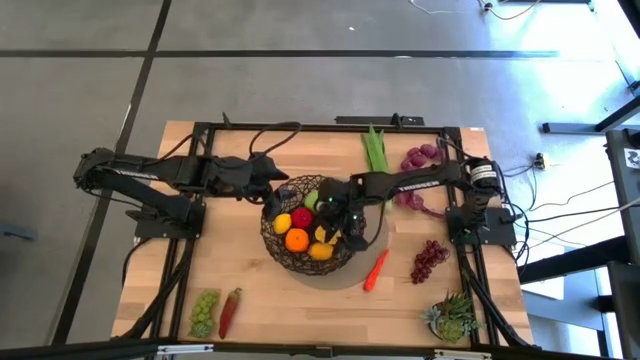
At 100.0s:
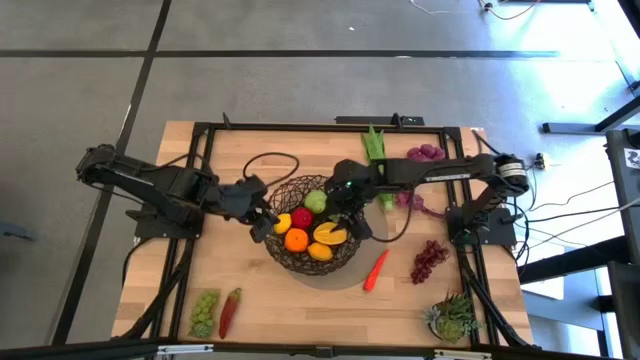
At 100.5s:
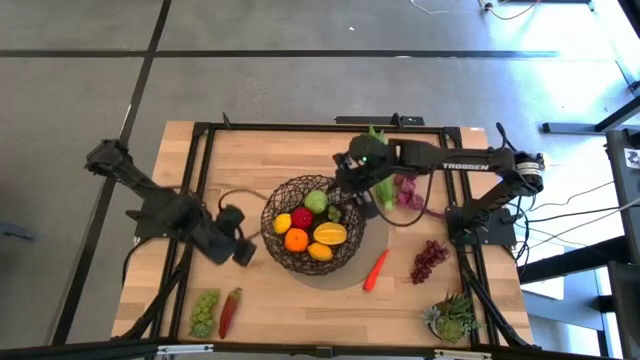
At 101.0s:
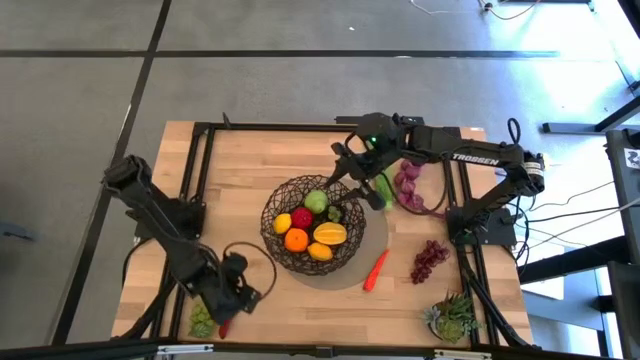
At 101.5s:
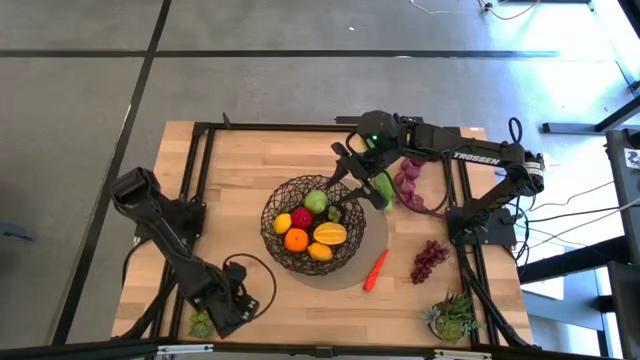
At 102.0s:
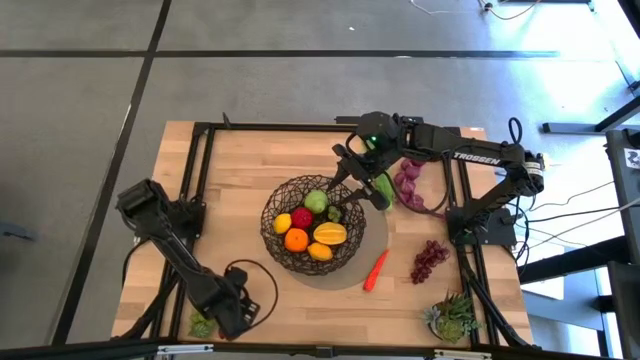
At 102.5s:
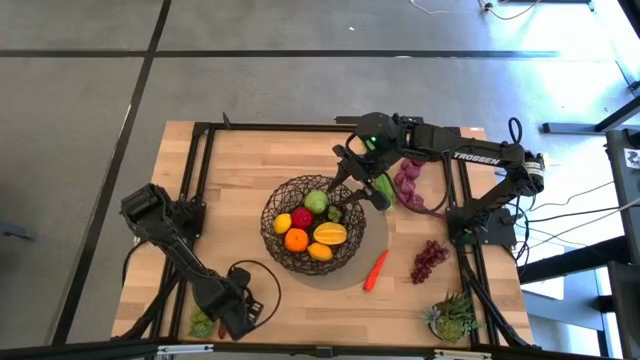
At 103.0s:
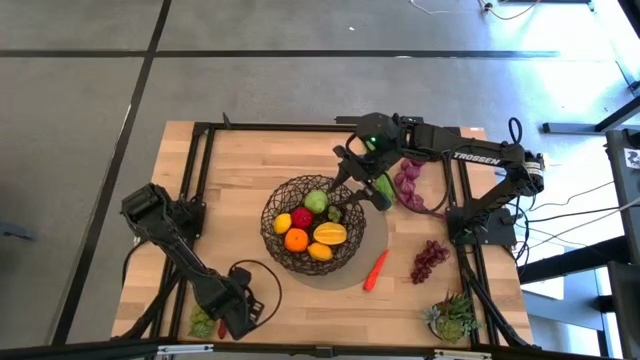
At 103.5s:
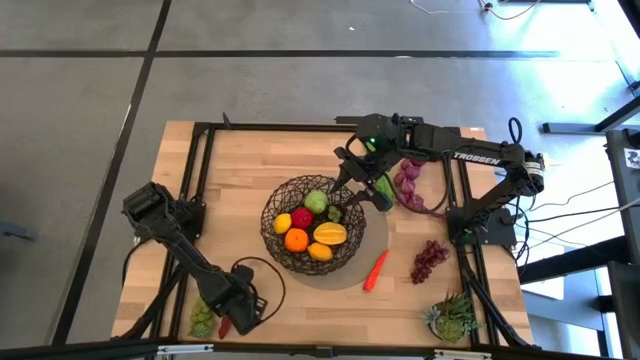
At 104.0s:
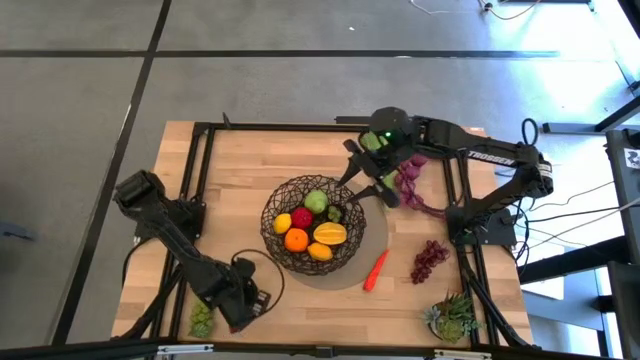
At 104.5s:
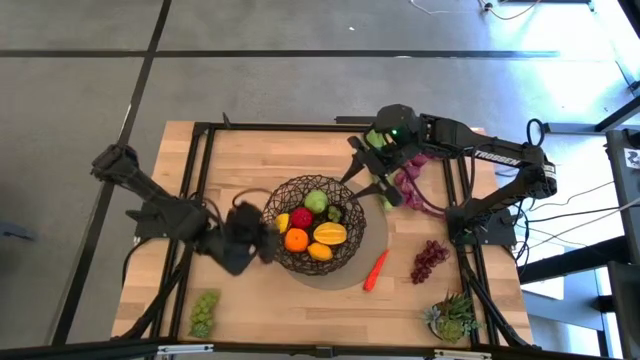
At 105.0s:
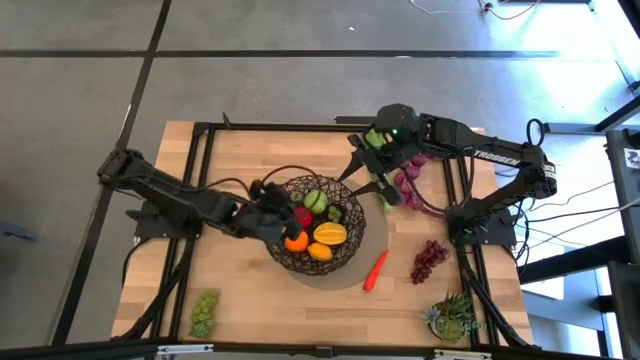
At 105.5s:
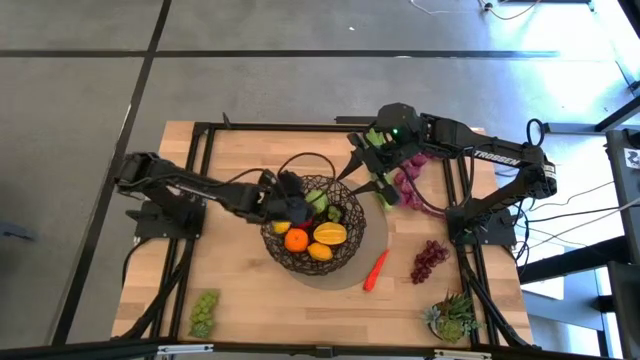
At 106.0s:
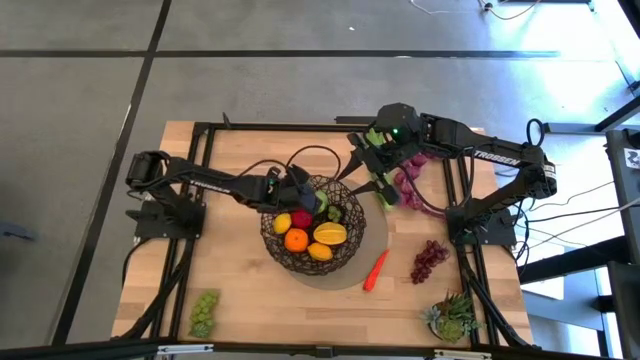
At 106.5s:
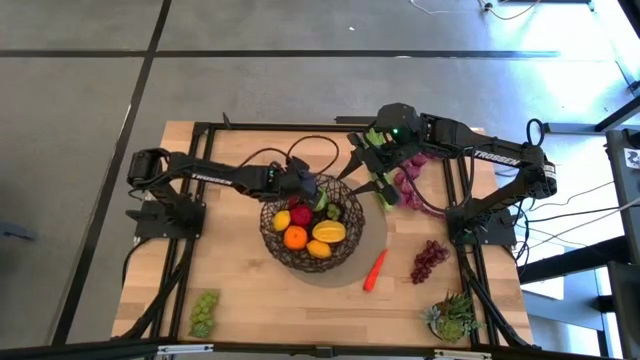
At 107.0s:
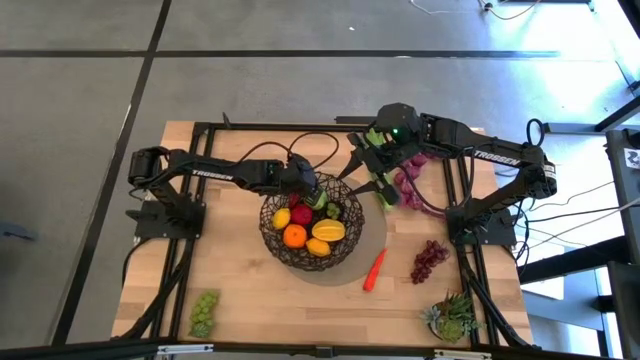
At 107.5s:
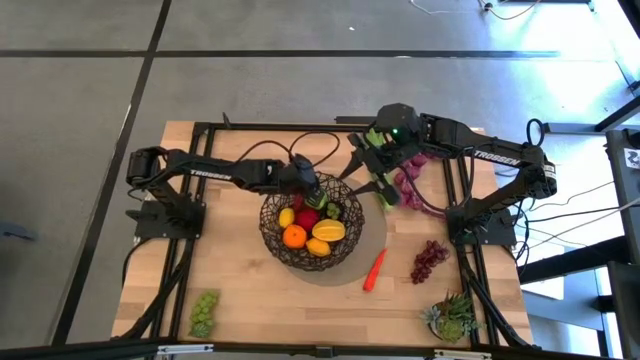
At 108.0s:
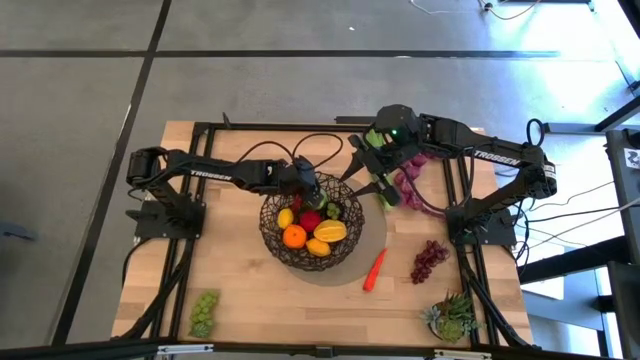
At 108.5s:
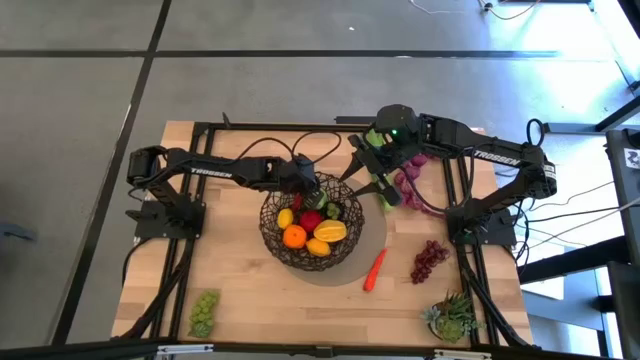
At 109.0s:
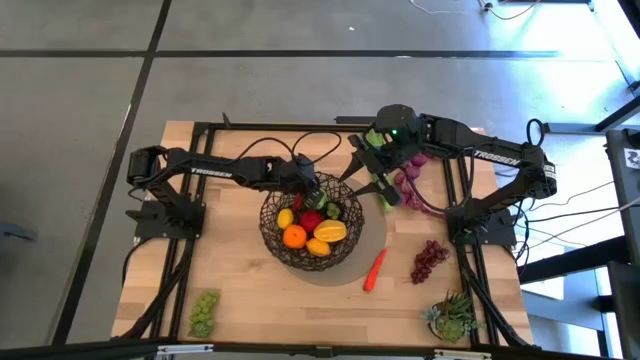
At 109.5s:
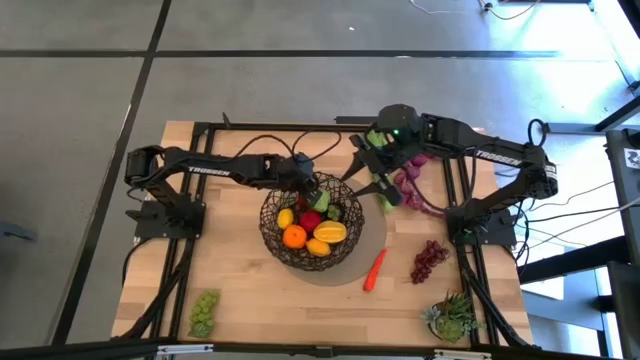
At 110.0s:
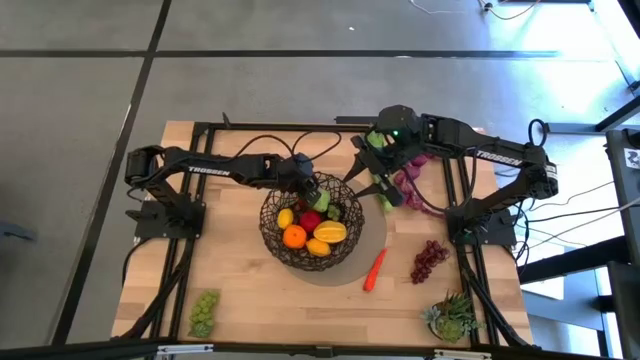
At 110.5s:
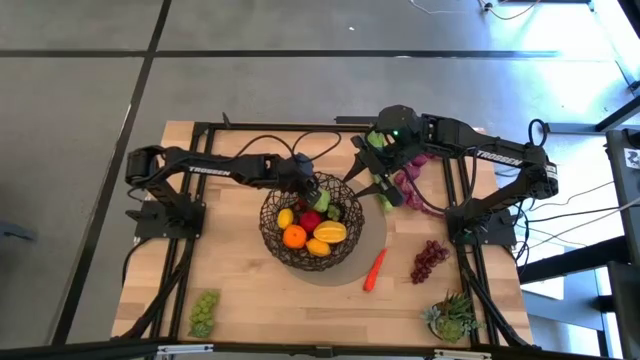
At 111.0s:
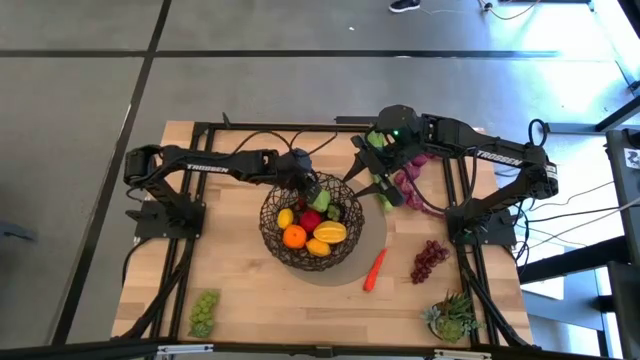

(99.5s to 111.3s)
Task: Build produce basket
Put the dark red chili pepper into the wire basket

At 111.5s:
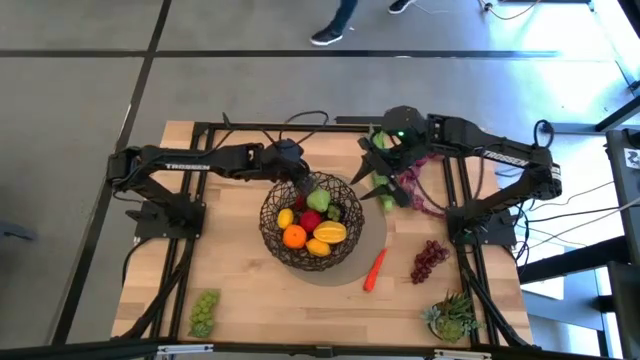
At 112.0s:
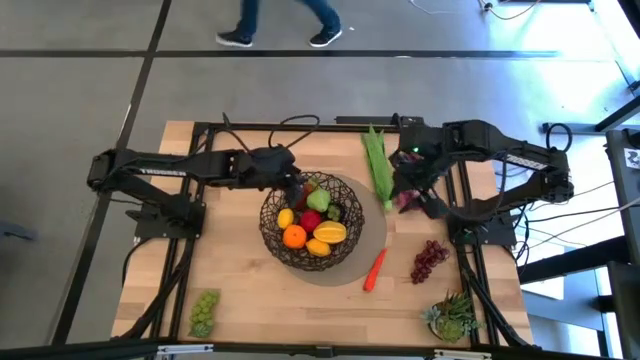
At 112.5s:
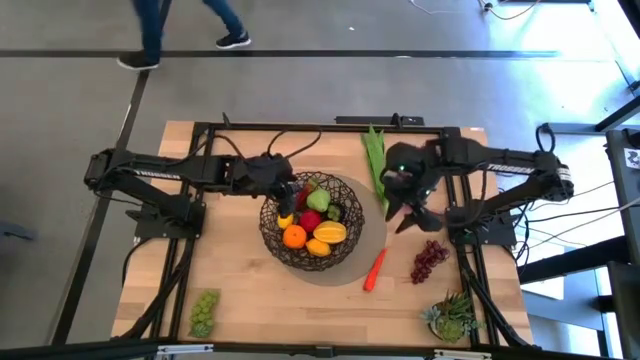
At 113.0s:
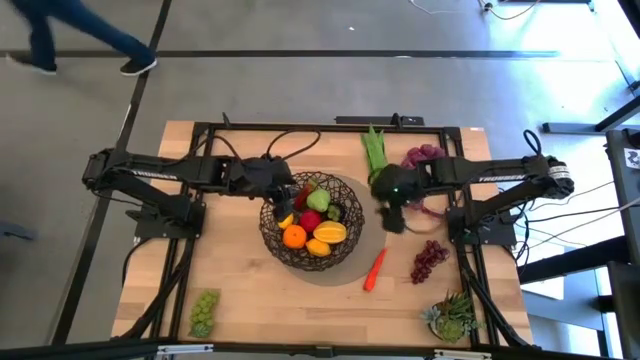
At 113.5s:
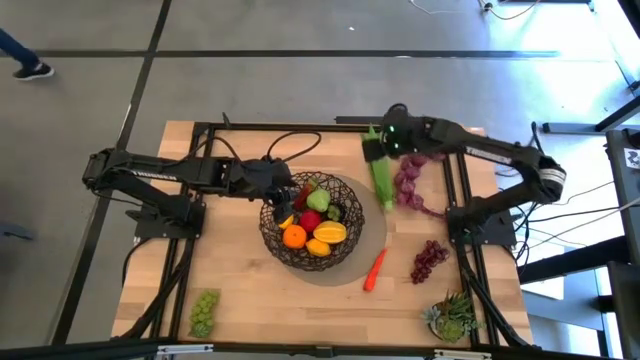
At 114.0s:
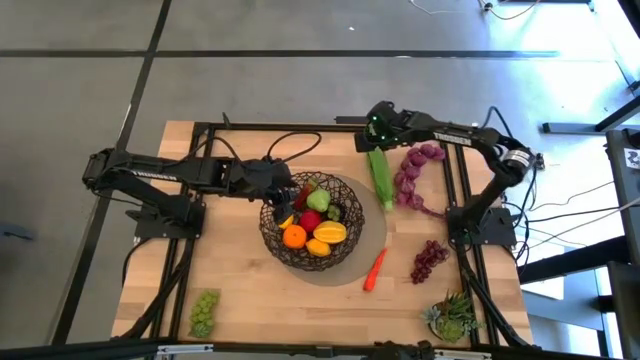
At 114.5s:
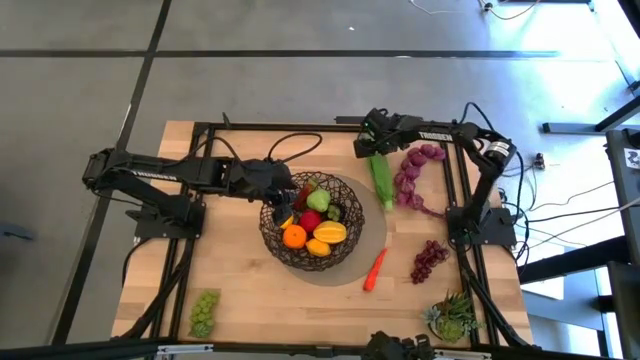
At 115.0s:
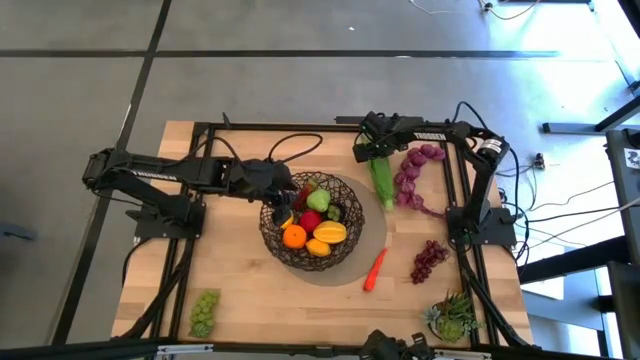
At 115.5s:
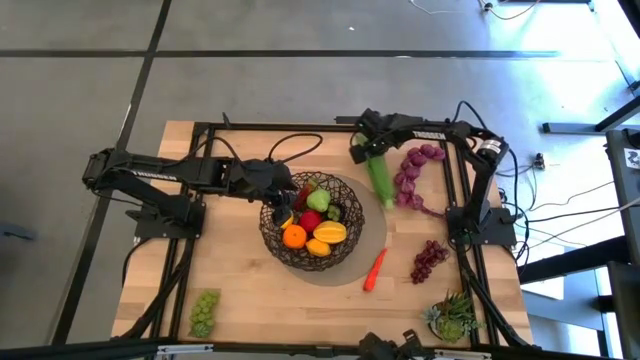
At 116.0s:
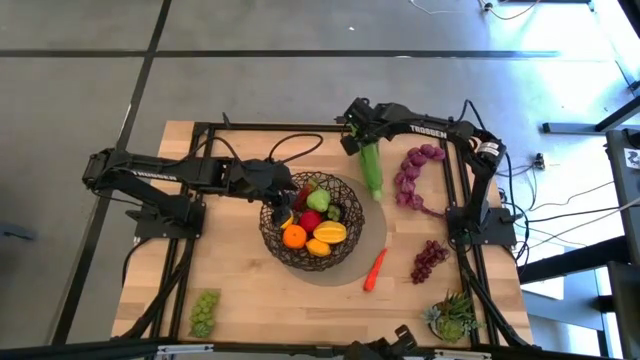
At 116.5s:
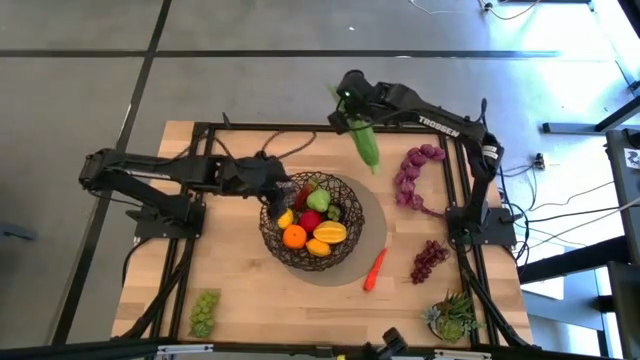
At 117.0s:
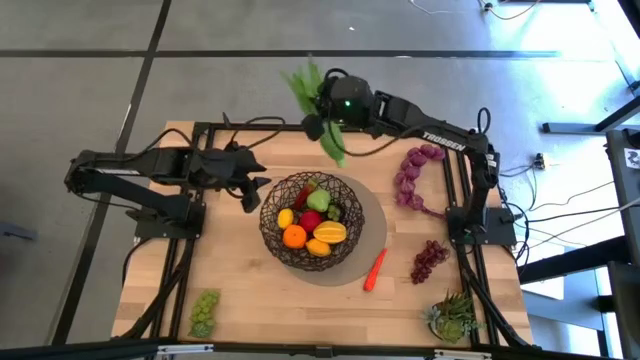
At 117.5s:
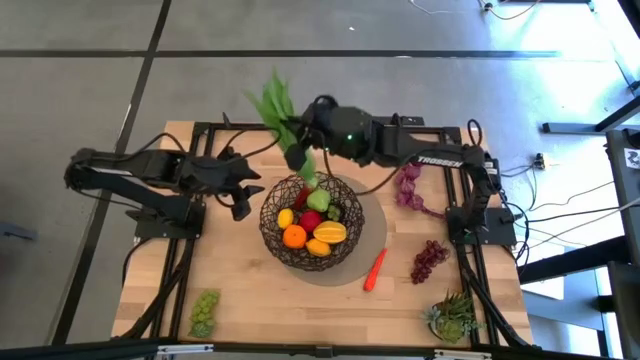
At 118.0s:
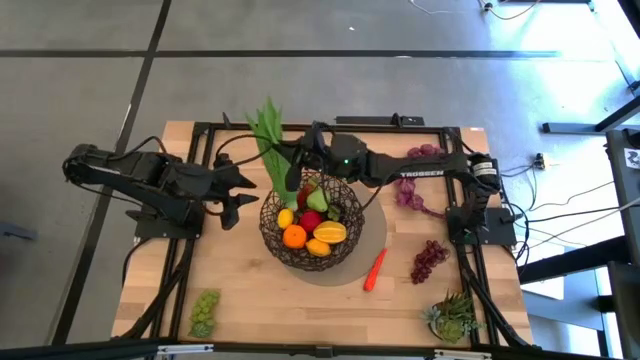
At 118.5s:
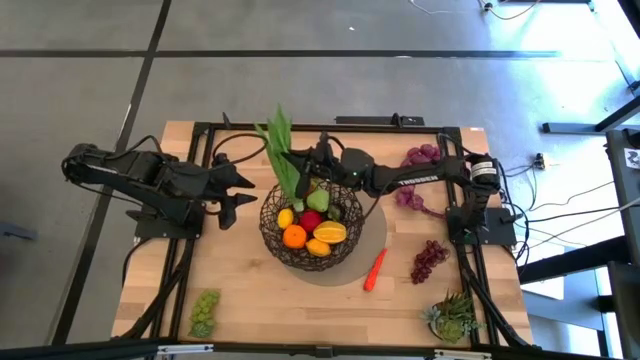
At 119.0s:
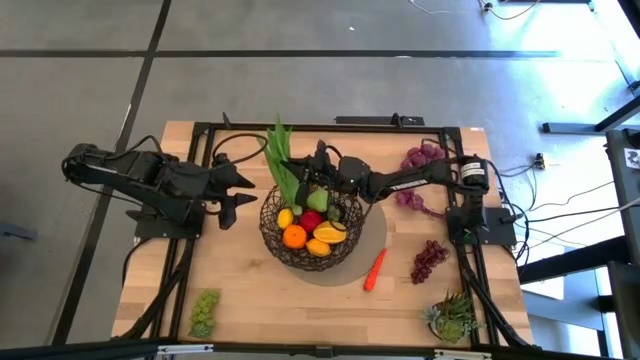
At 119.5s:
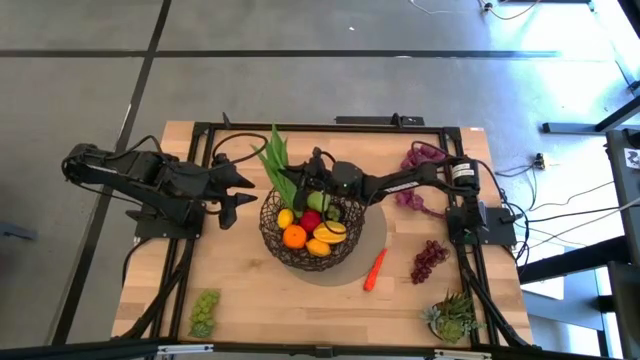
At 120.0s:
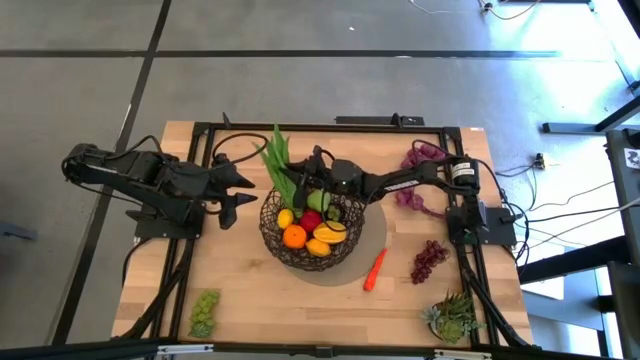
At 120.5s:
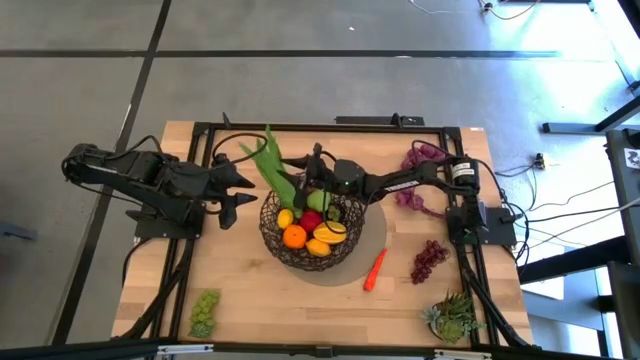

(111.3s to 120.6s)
Put the leaf lettuce into the wire basket

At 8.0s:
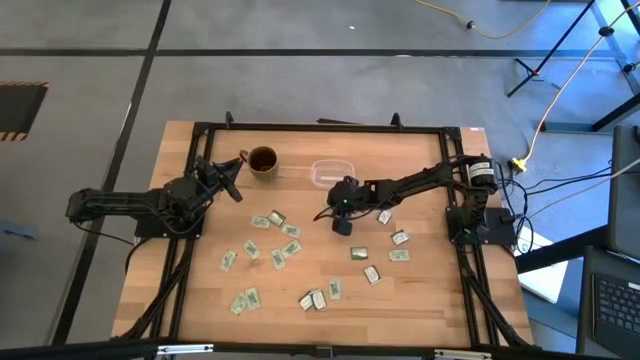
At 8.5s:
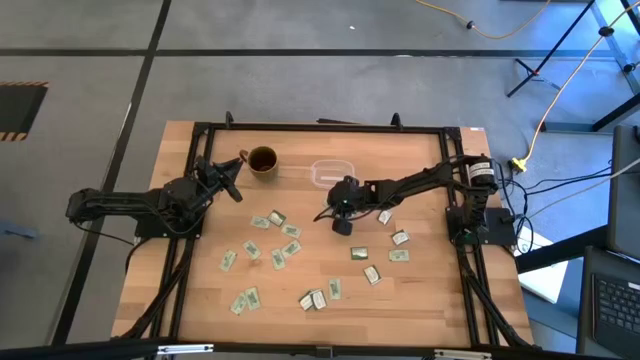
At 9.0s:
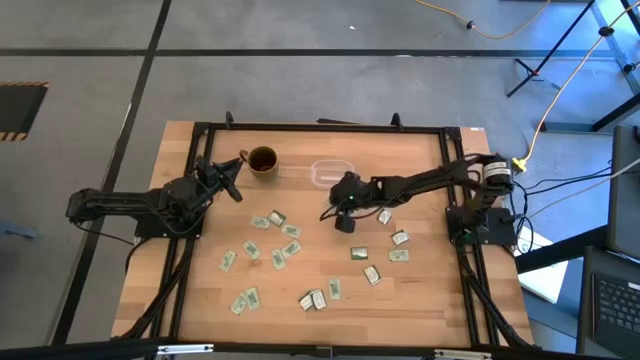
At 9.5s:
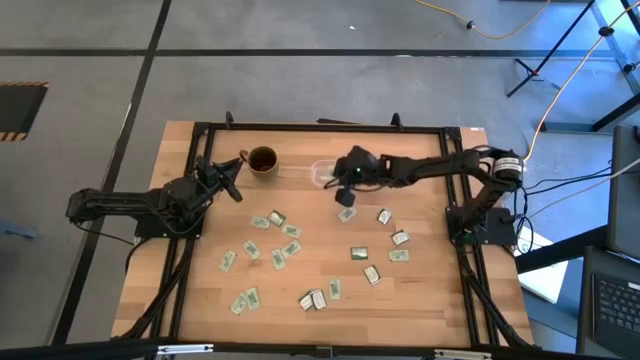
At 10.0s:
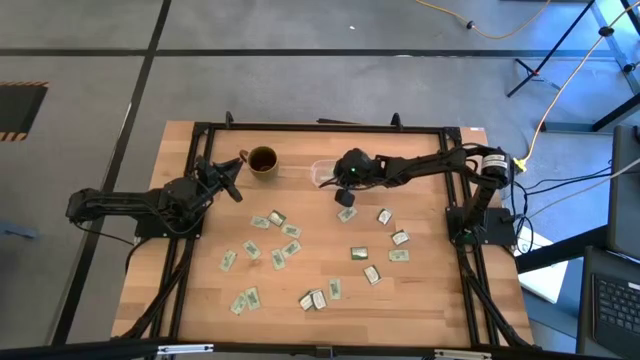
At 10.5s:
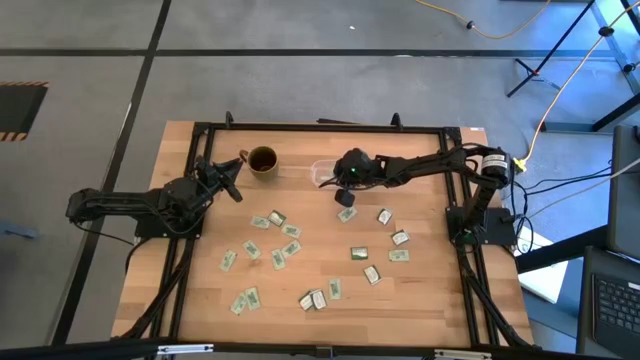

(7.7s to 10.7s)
Task: Pick and place Stevia / Truvia into bins
Put the stevia packet into the transparent container
